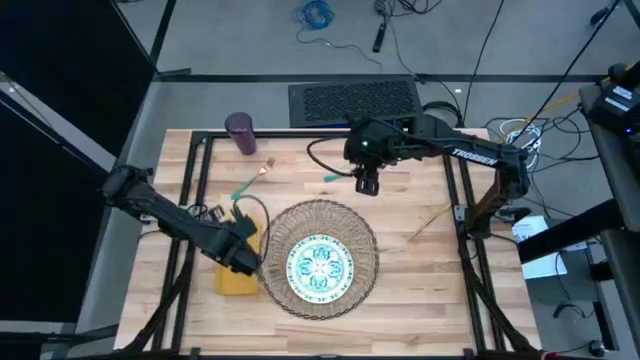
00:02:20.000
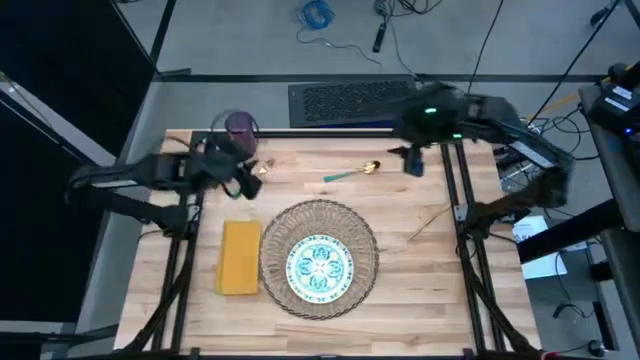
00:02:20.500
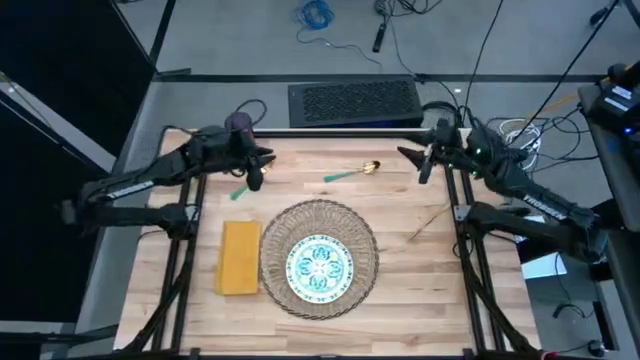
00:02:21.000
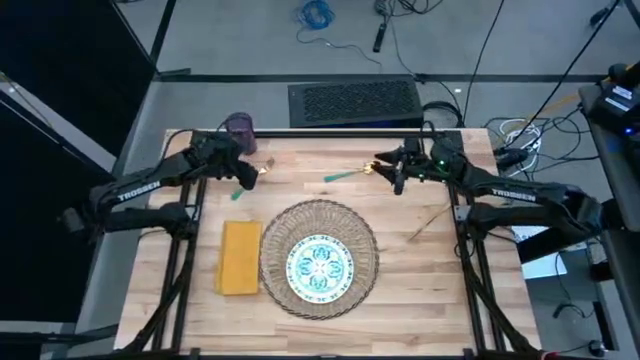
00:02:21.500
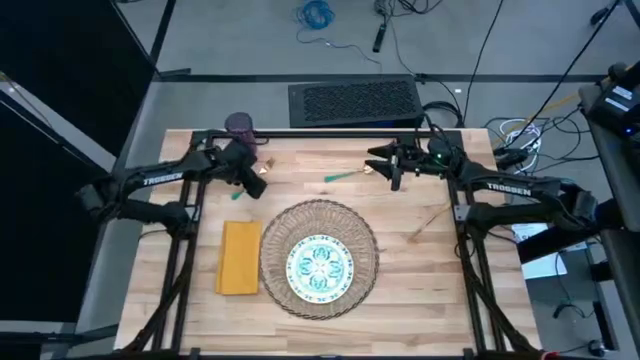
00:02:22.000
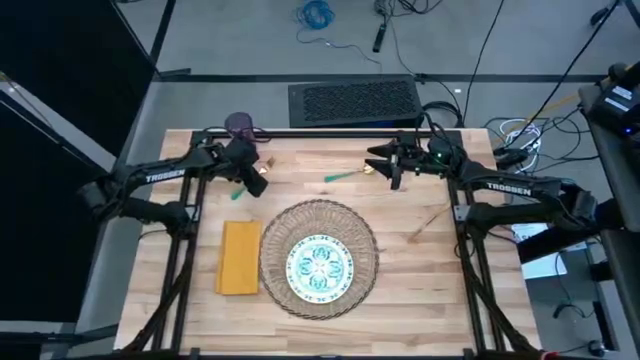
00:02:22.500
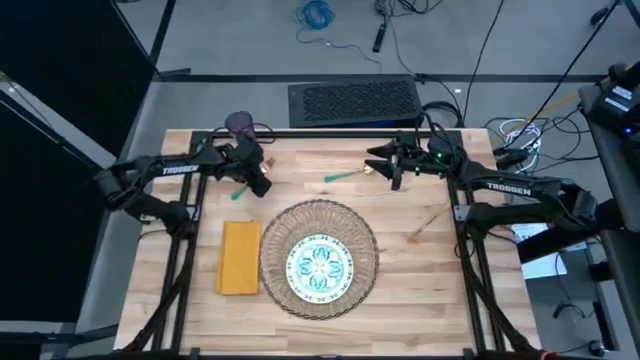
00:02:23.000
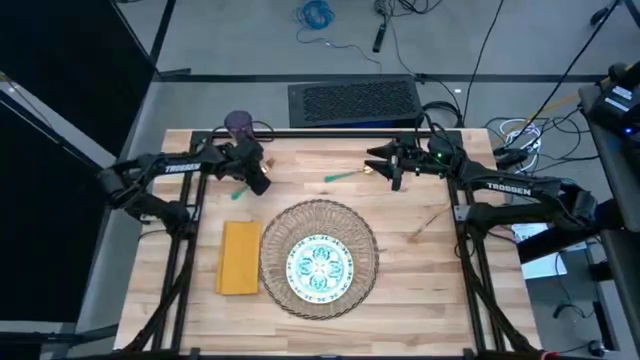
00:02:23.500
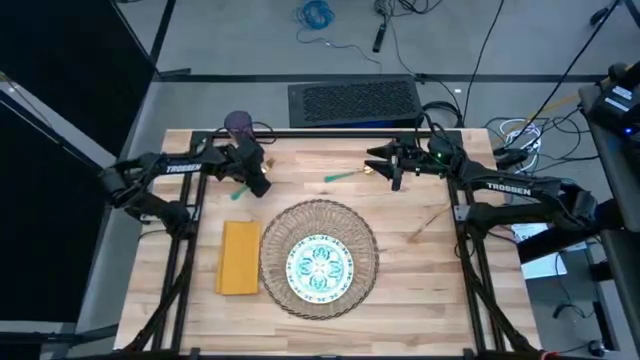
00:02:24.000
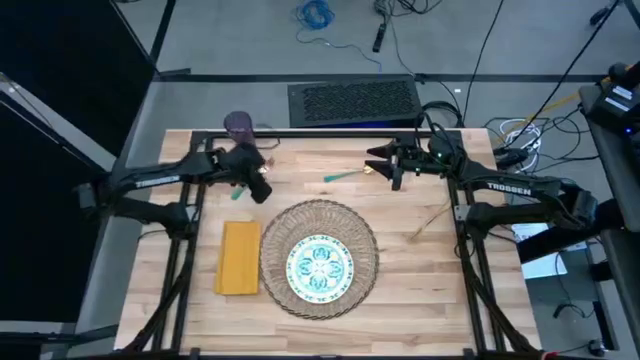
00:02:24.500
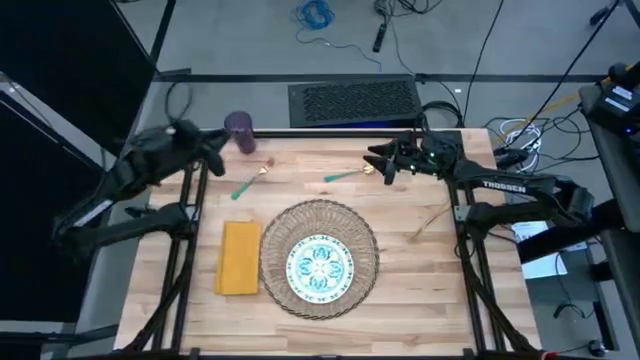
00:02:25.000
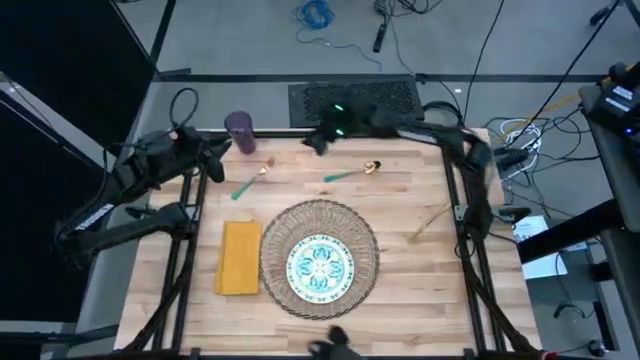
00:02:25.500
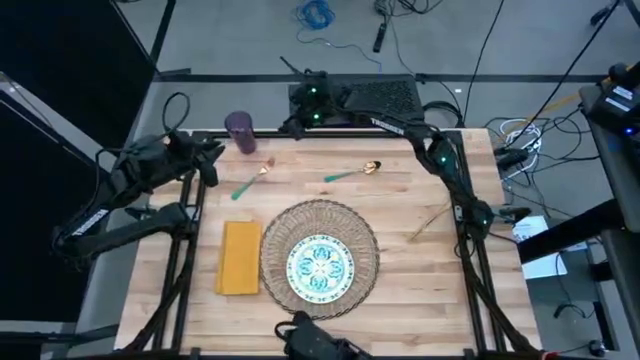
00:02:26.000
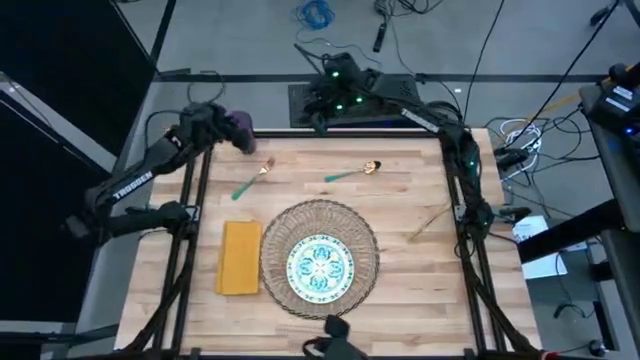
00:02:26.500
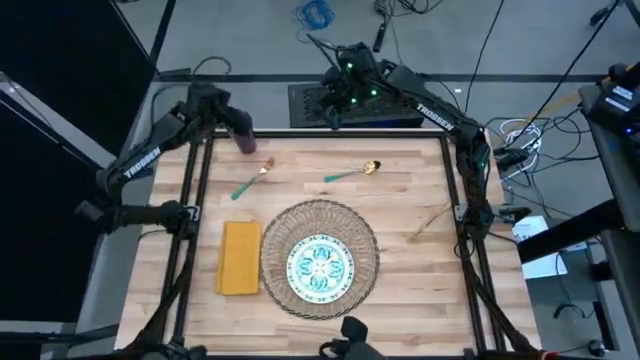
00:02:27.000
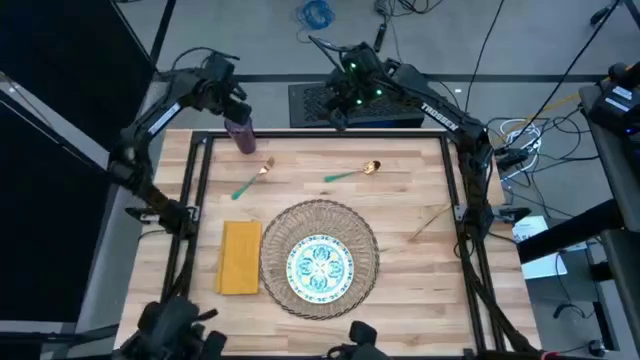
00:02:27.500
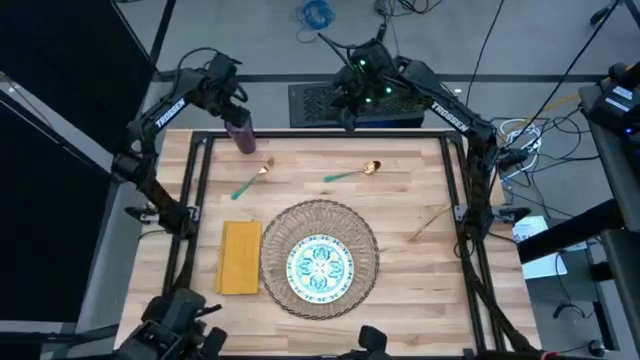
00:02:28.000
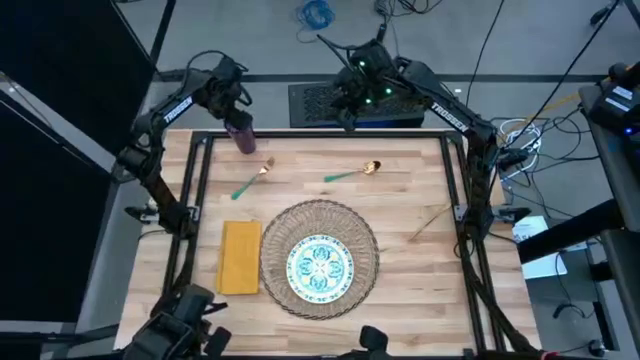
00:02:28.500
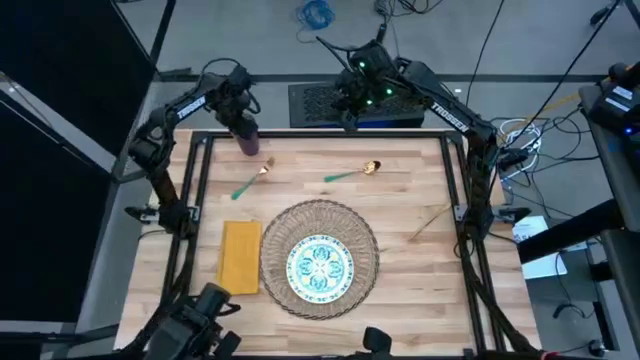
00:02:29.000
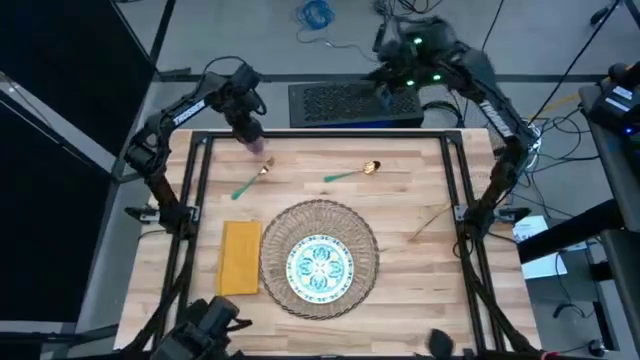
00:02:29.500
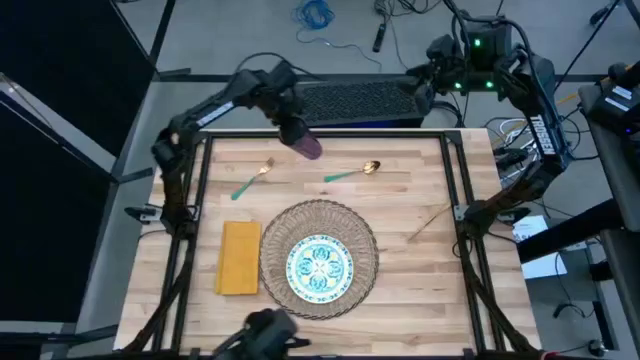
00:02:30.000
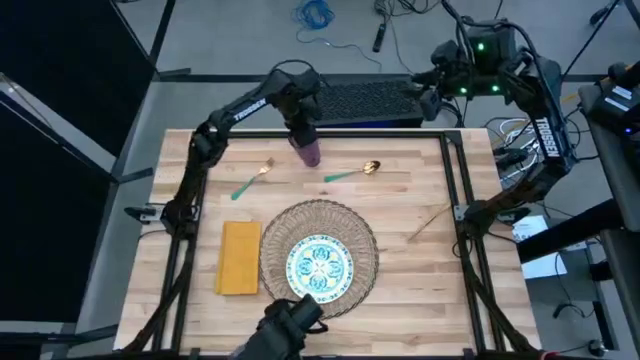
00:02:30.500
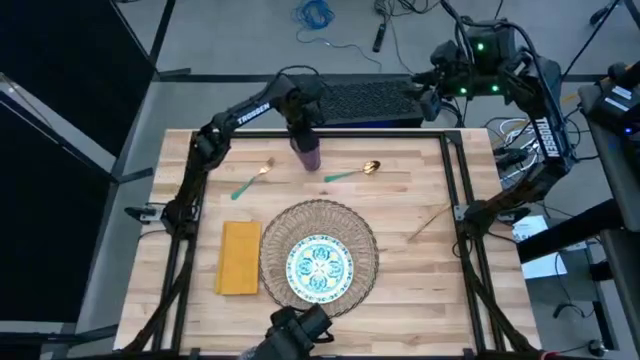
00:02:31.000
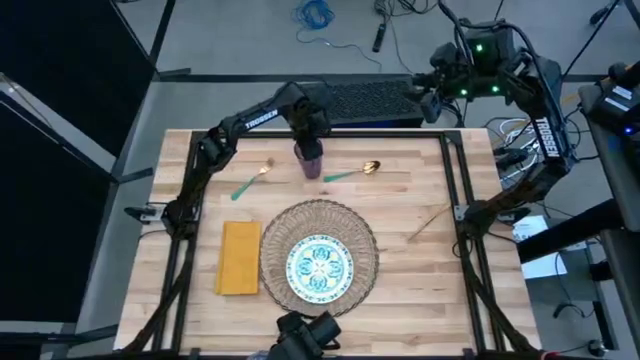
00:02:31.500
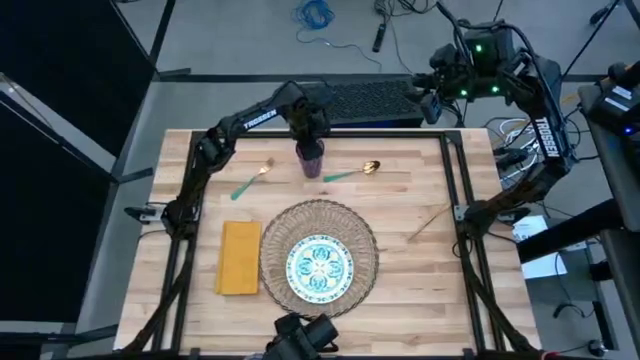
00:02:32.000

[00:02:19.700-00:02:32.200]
Task: Set table place
Move the purple cup to the top center of the table

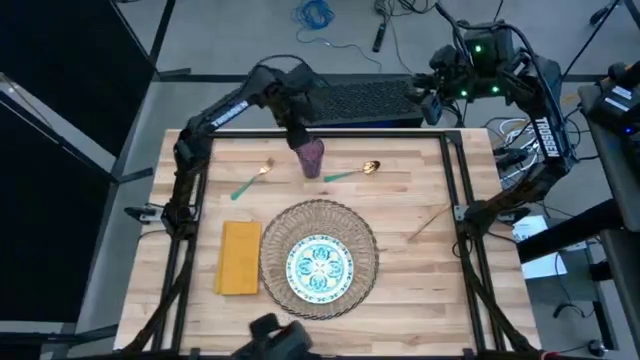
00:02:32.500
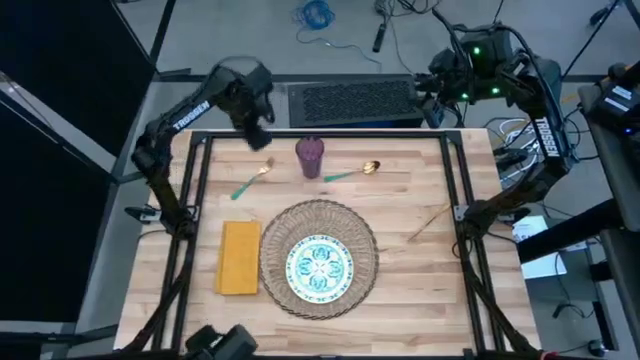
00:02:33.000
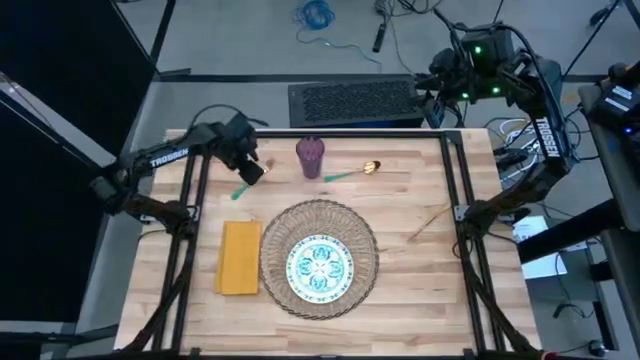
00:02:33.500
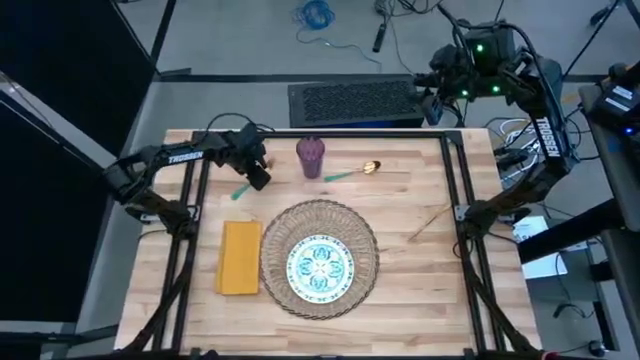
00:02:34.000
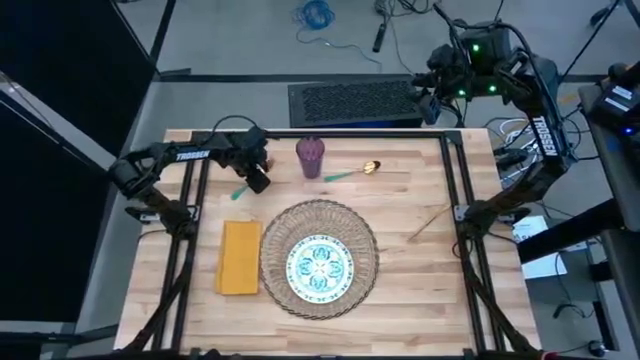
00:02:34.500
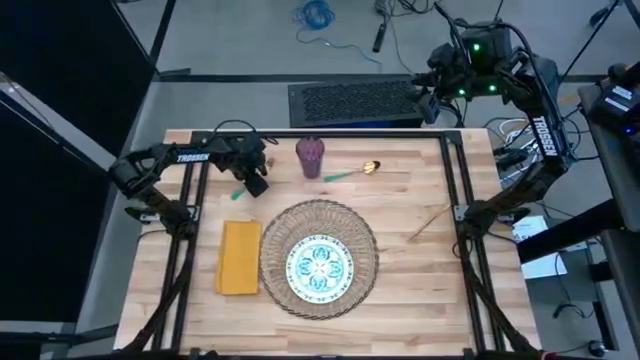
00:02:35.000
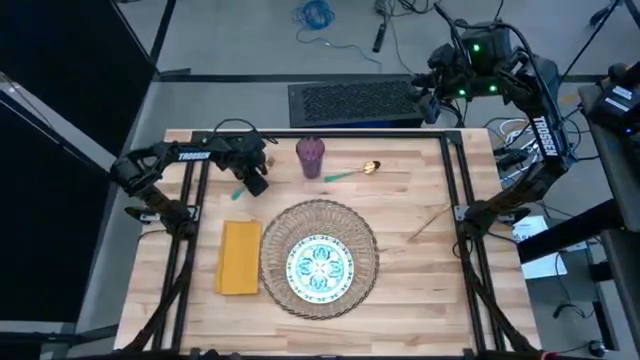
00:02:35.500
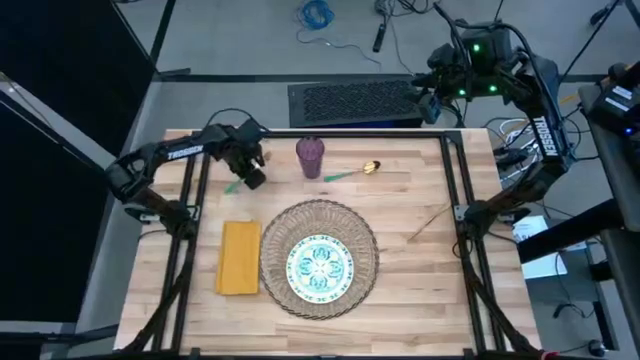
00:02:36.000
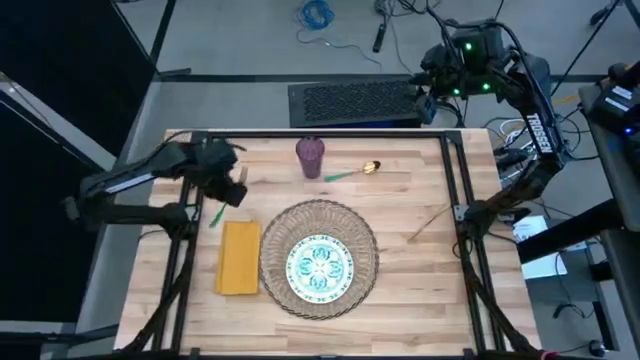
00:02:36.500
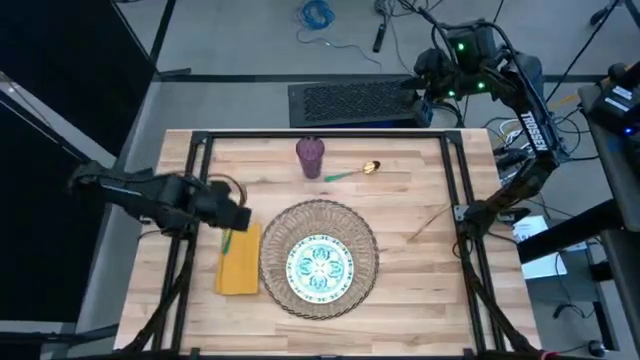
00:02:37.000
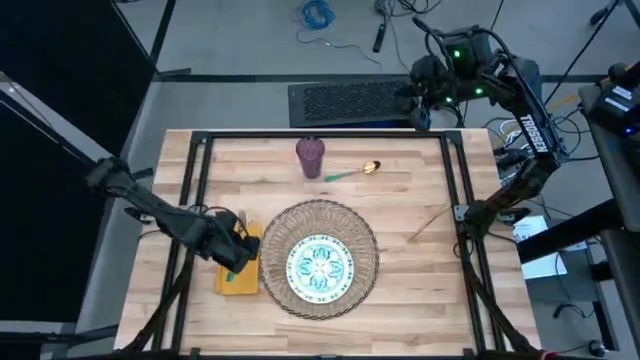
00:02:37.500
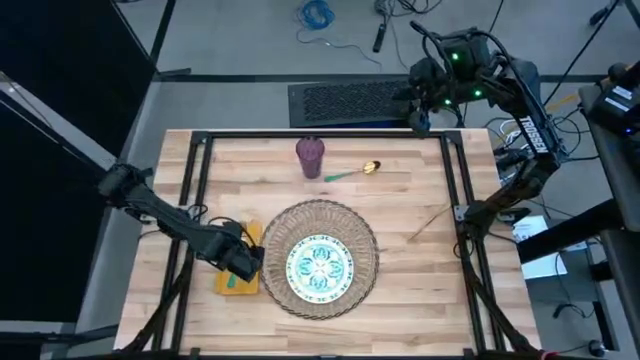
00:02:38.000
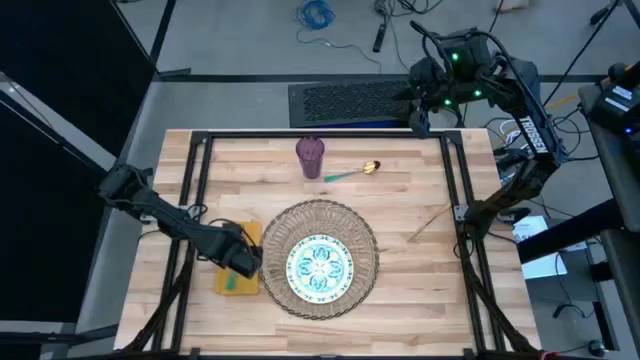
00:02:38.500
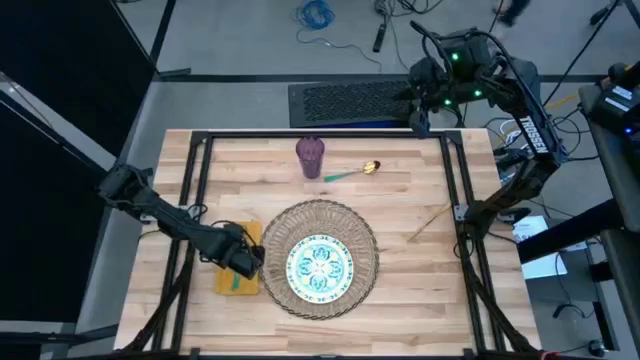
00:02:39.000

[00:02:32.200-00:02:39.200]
Put the green fork on top of the yellow napkin

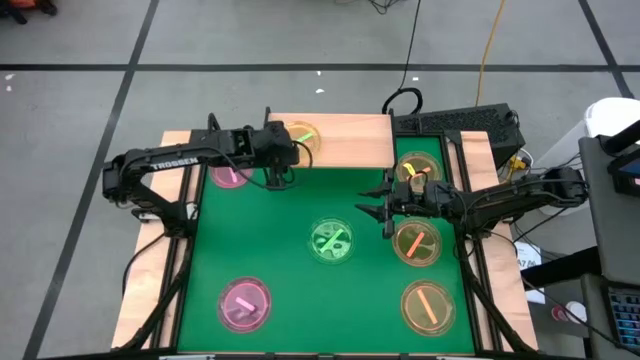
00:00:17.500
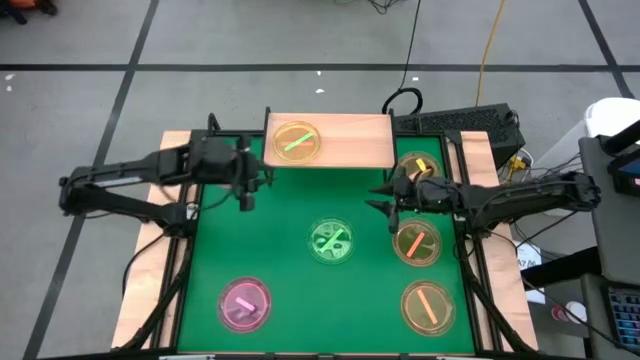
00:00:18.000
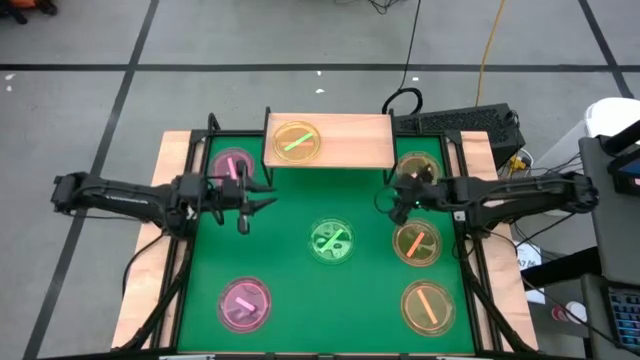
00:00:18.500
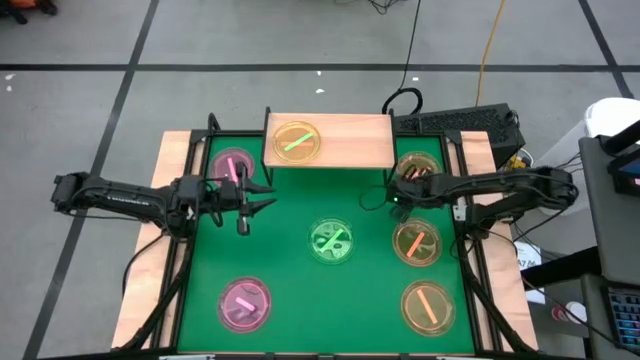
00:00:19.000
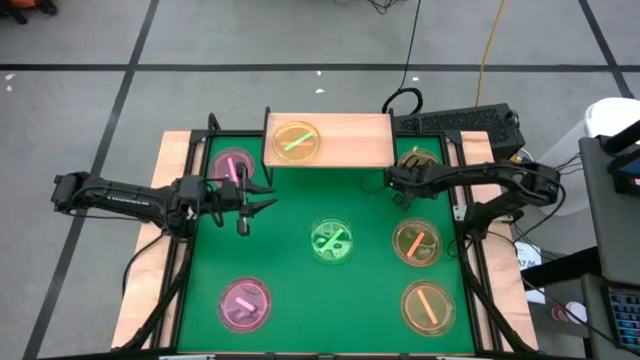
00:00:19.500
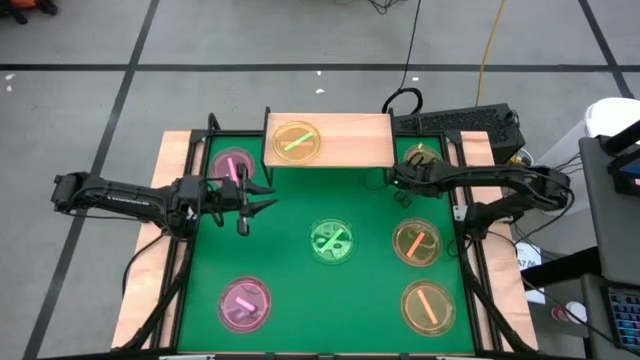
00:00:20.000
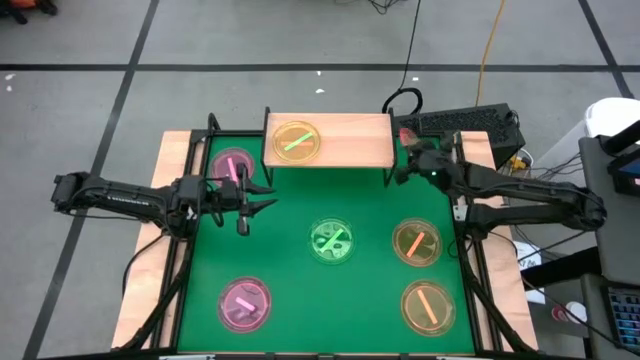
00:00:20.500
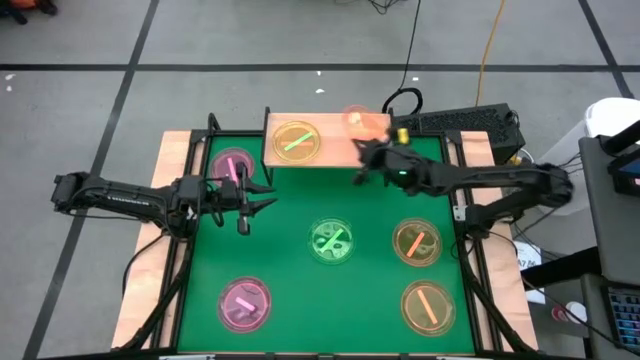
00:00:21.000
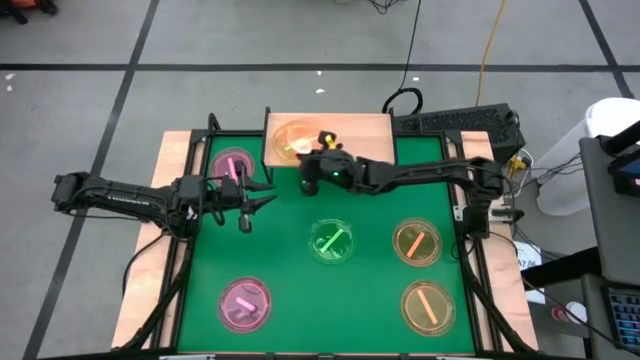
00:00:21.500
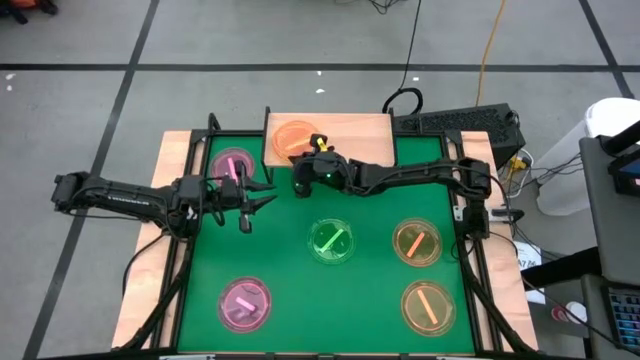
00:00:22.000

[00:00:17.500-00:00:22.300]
Task: Place and stack plates onto a shelf
Stack the orange plate on top of the green plate on the shelf
